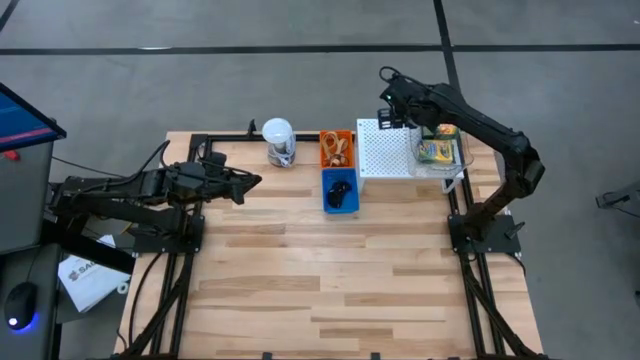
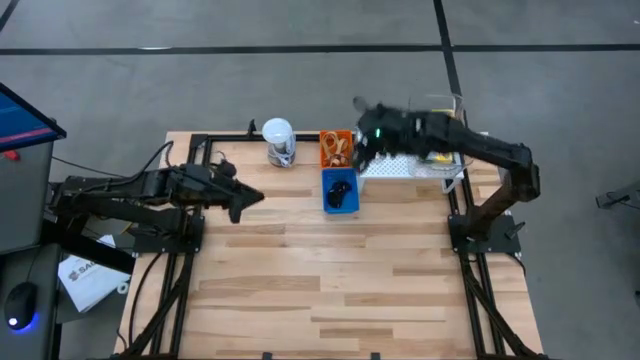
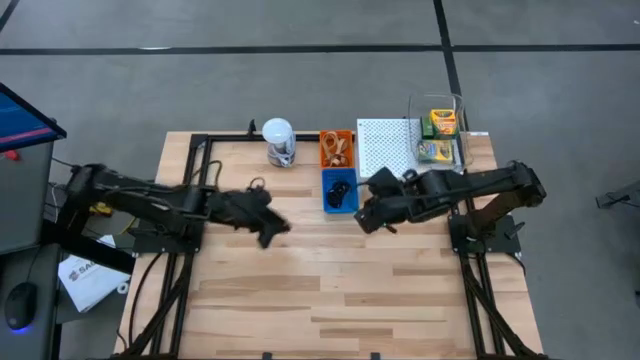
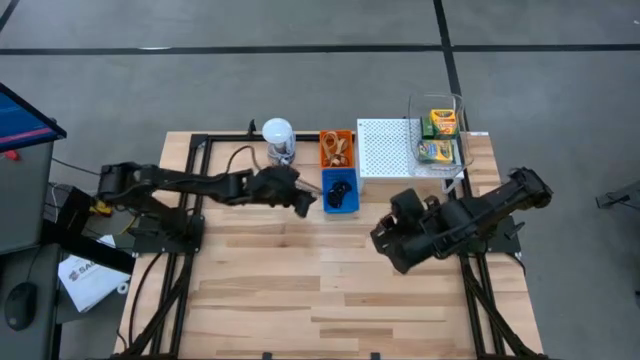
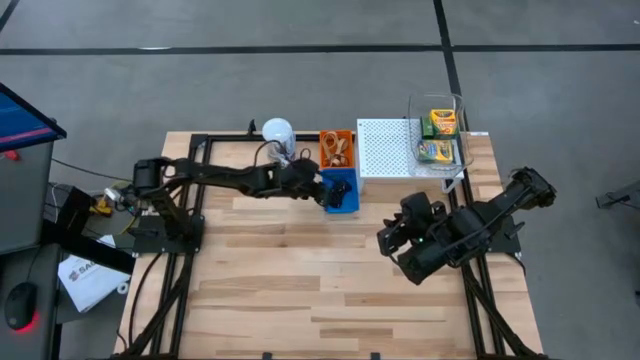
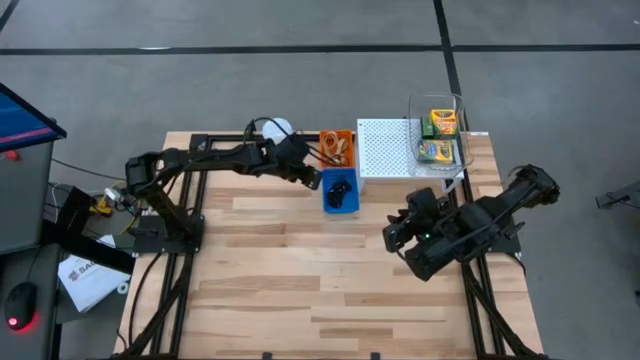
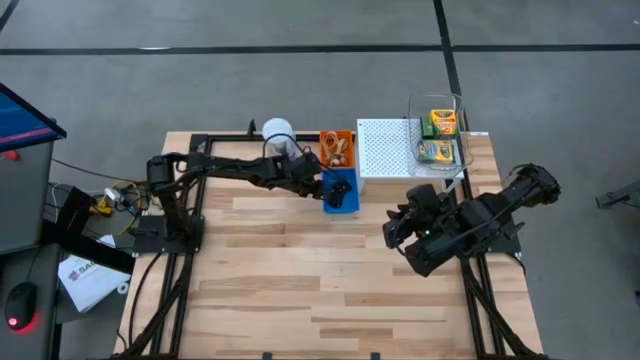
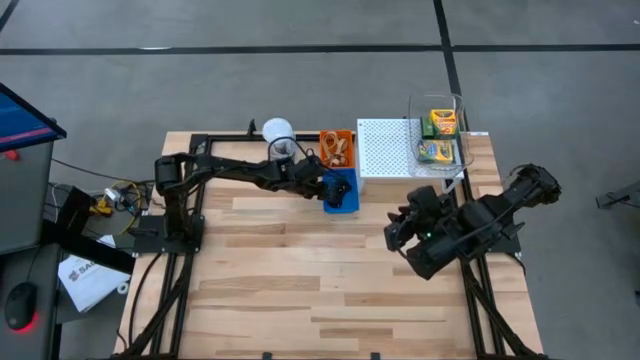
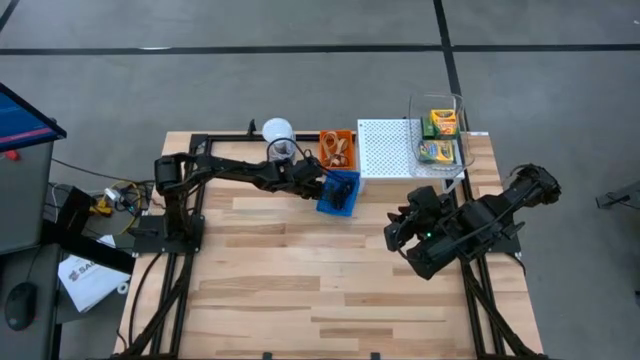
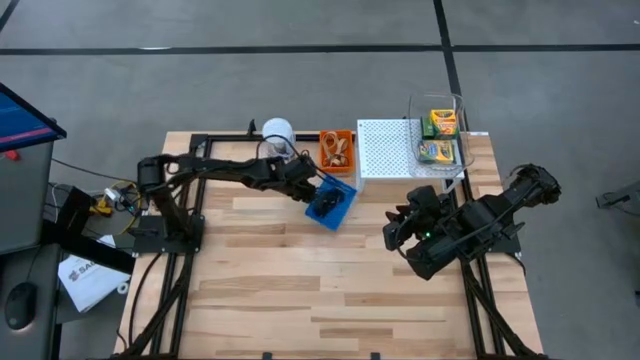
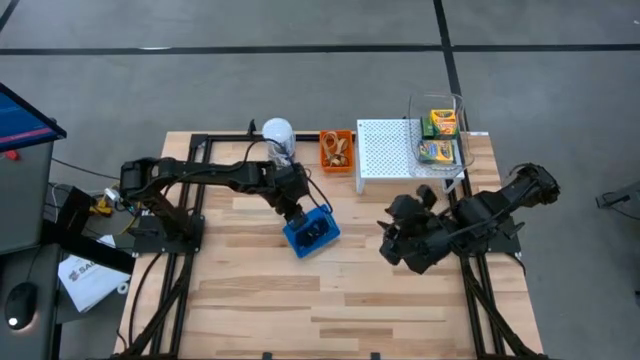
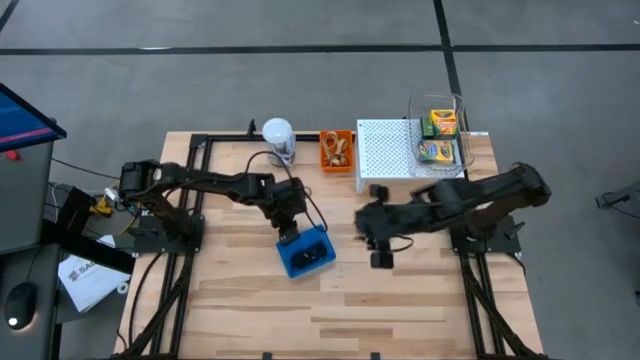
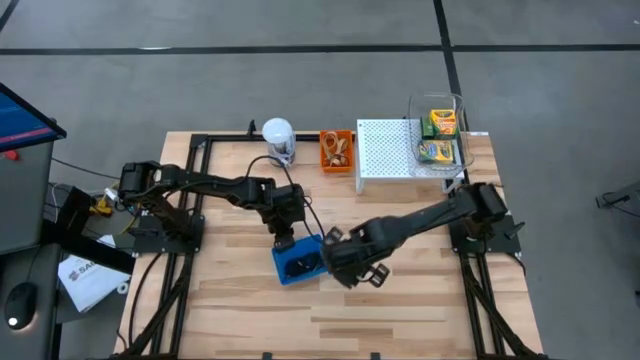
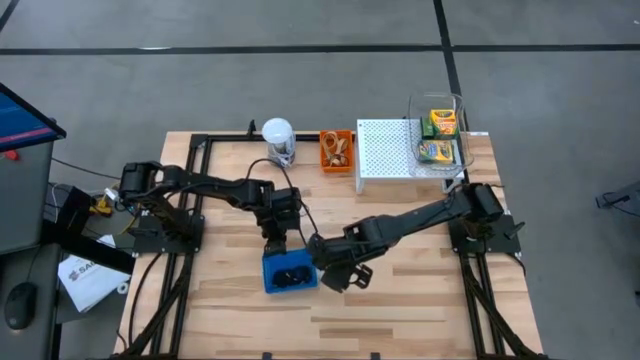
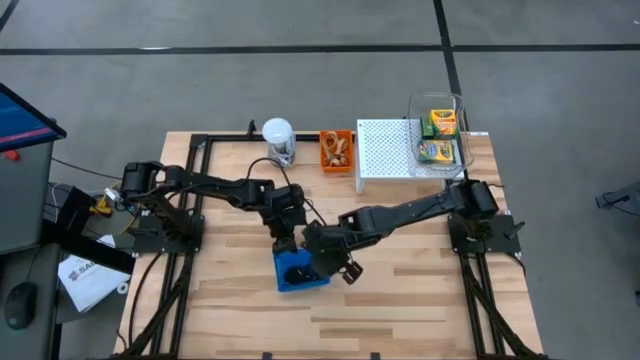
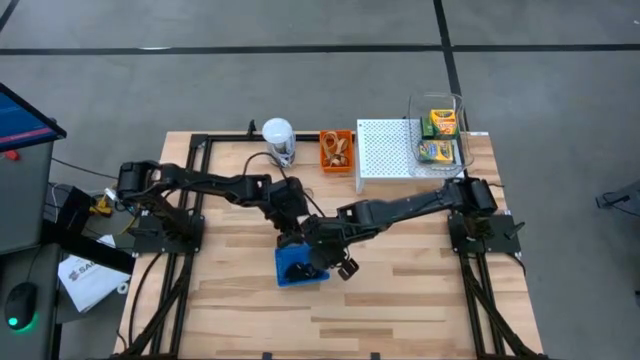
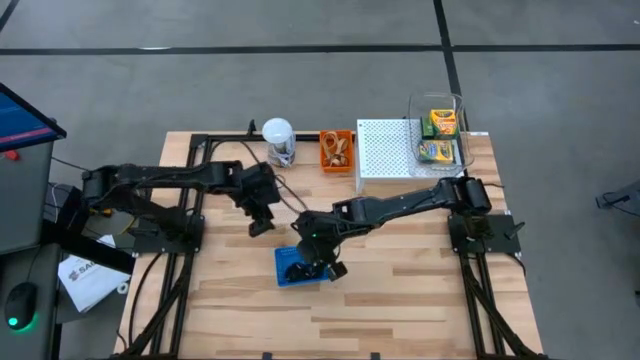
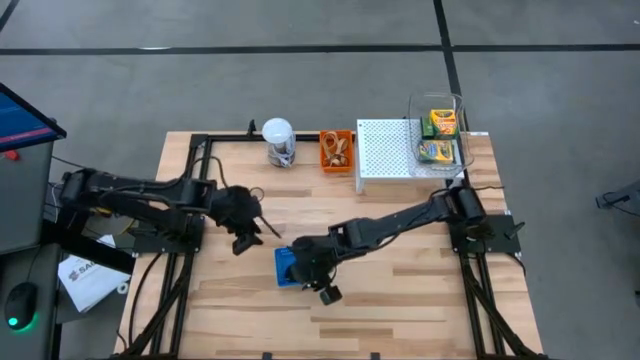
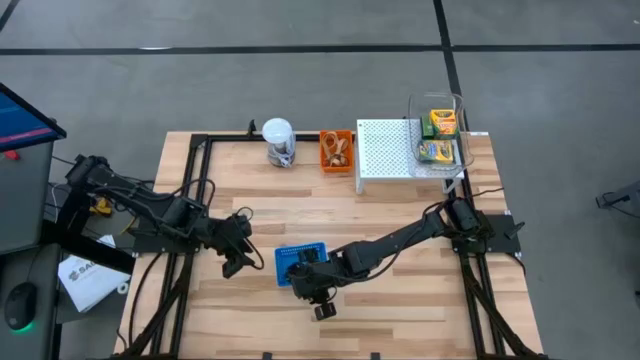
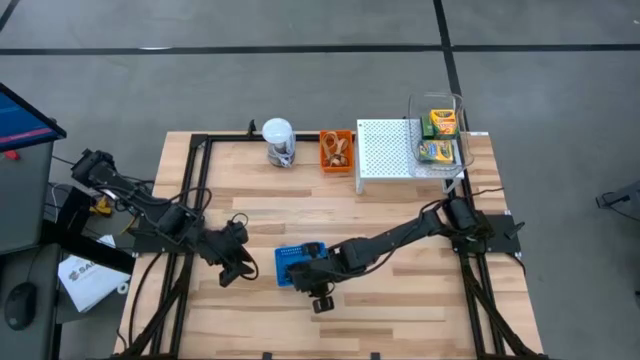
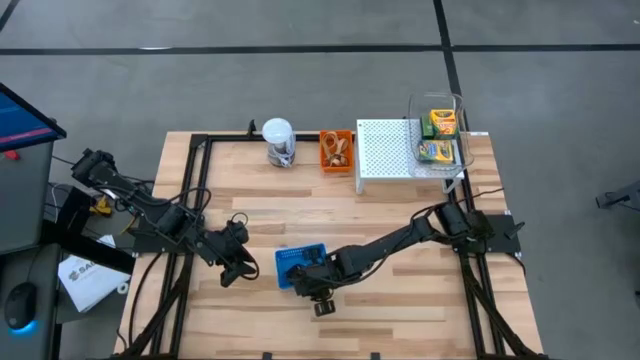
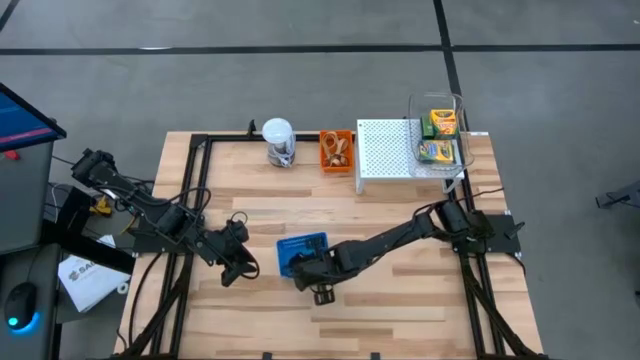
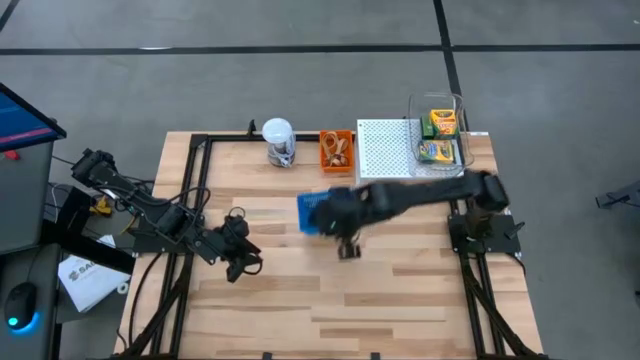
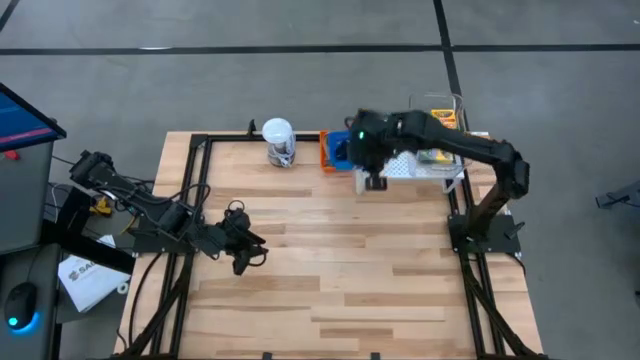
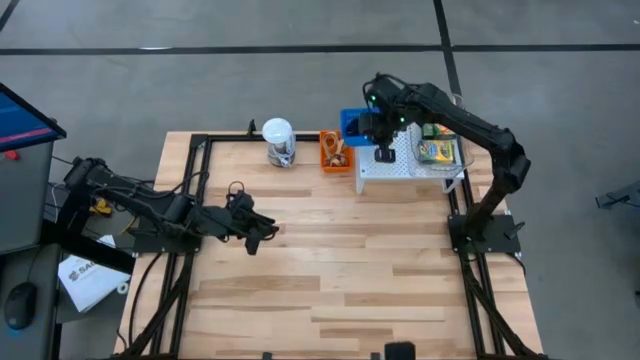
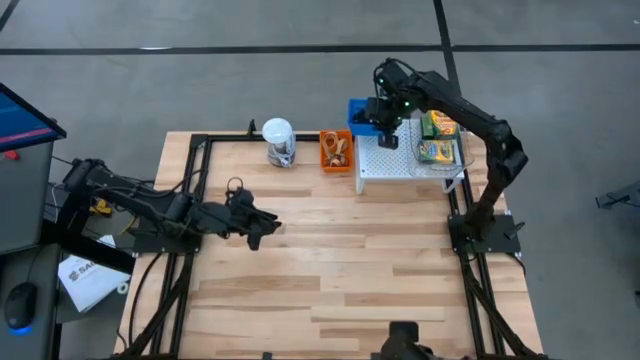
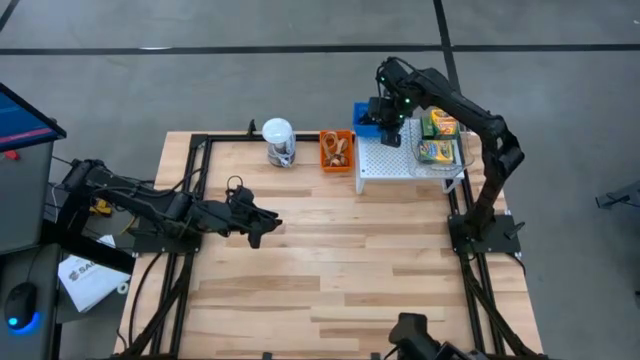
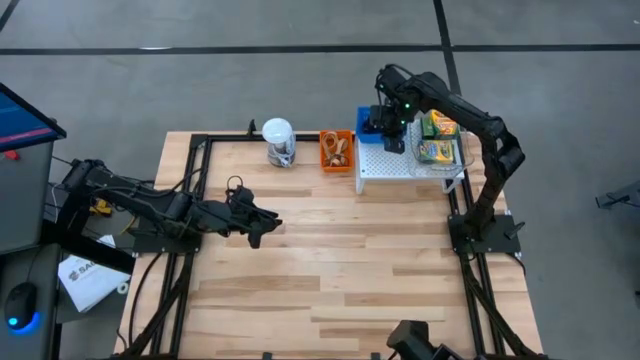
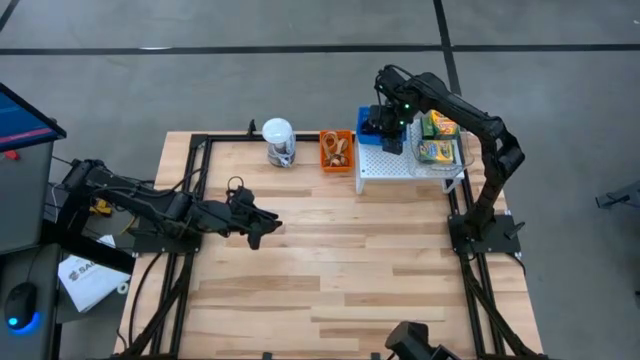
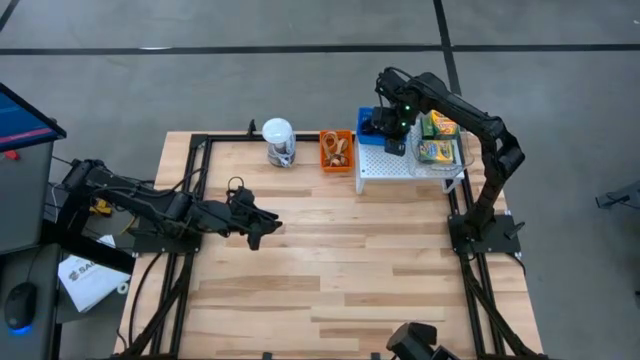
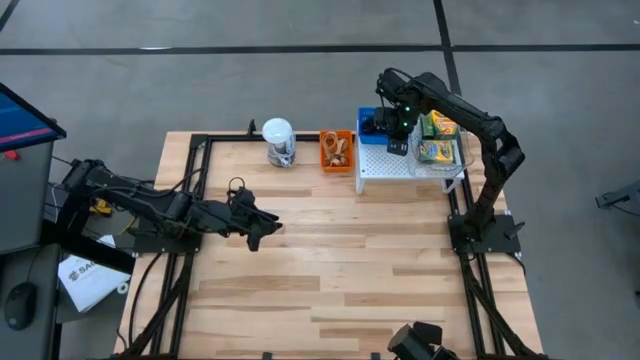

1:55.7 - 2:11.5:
Task: Pick & Place Office Desk Supplies
Put the blue basket on the shelf

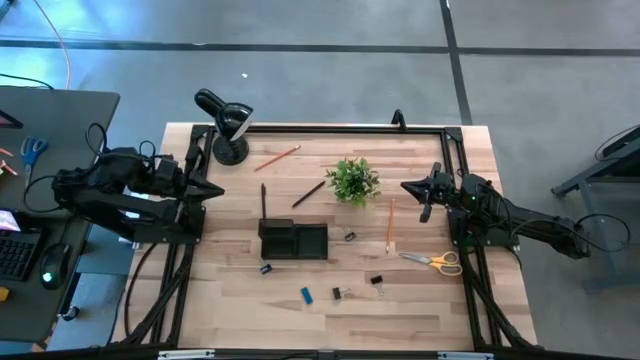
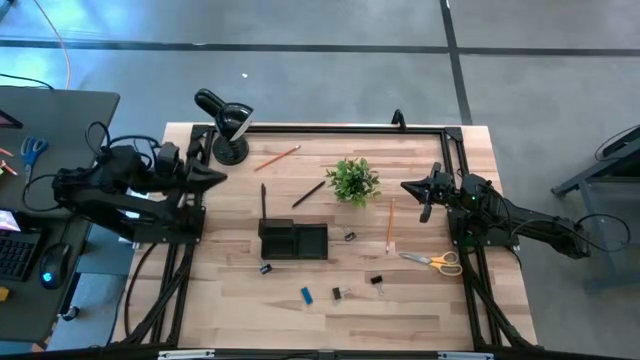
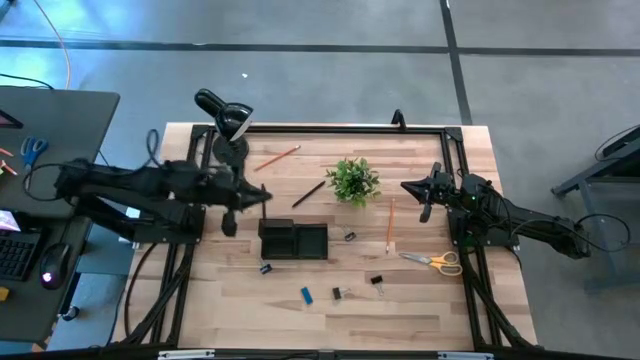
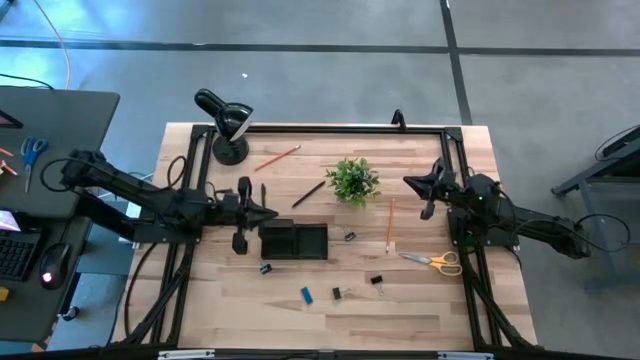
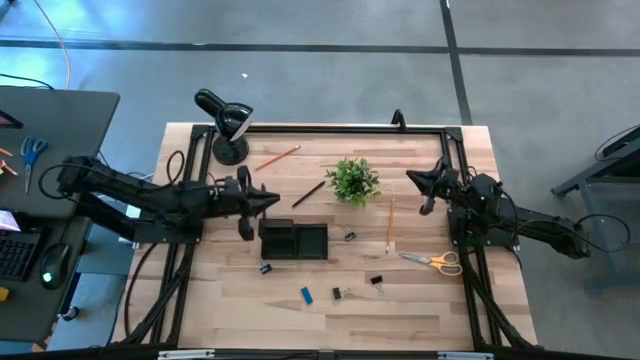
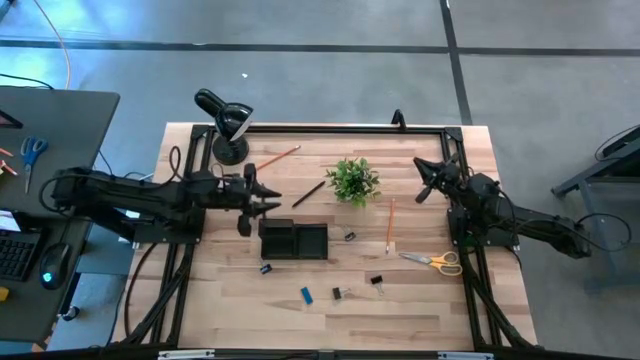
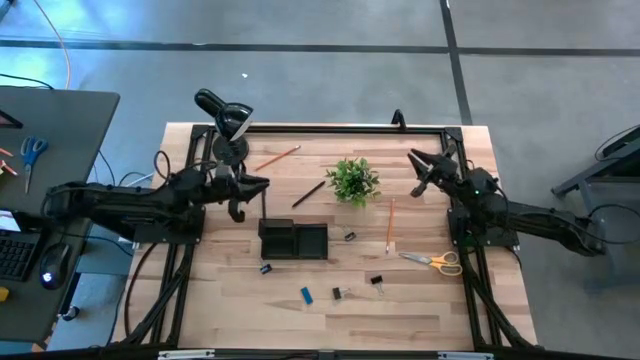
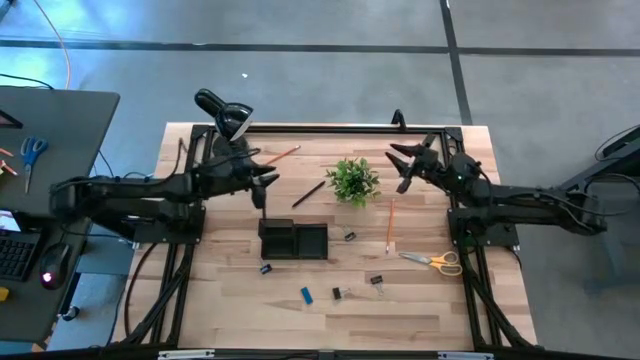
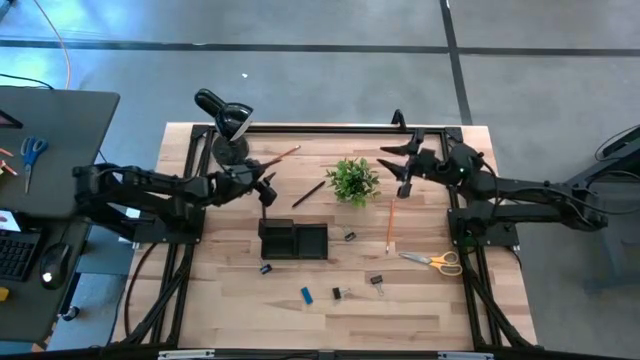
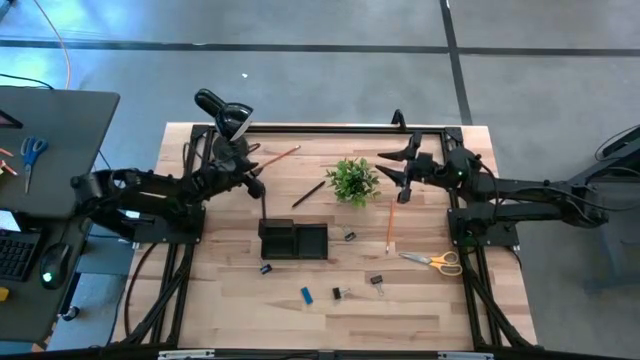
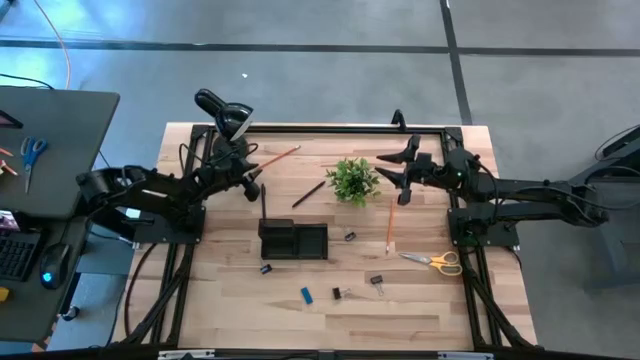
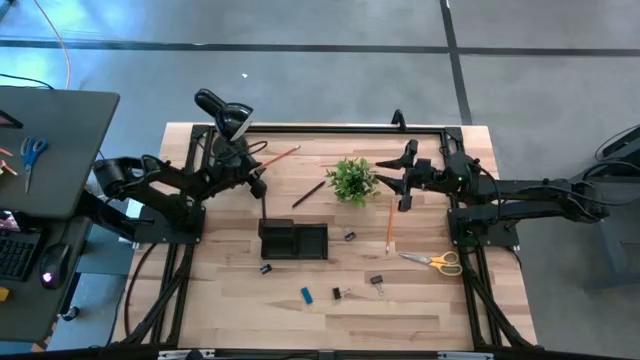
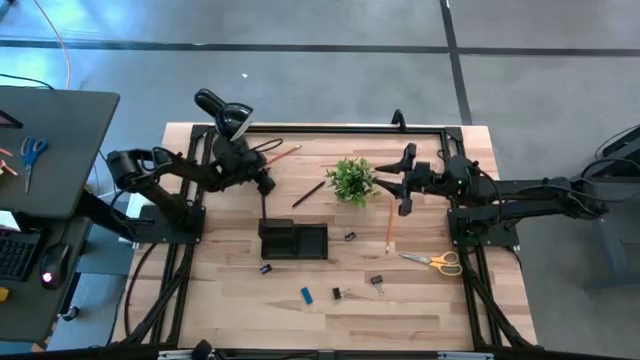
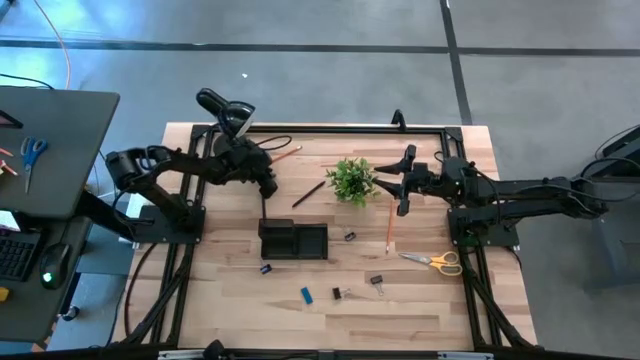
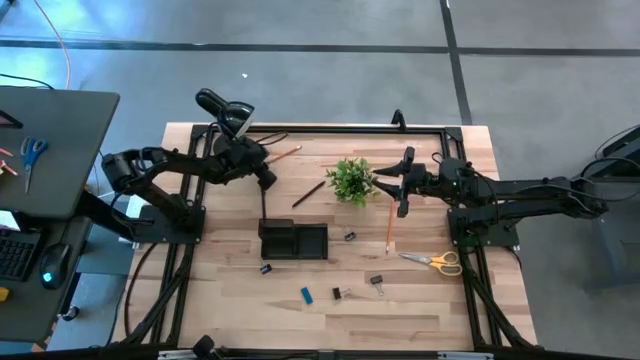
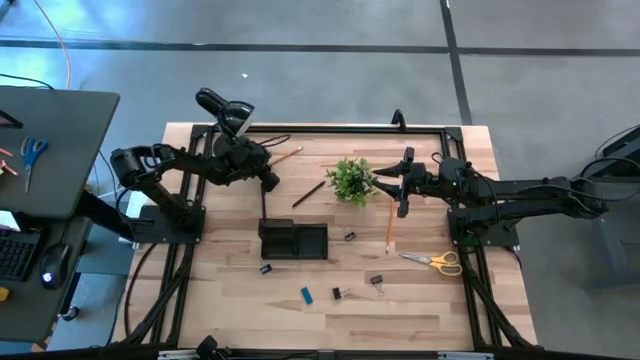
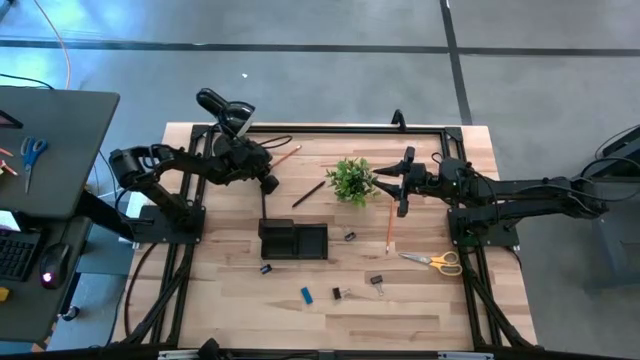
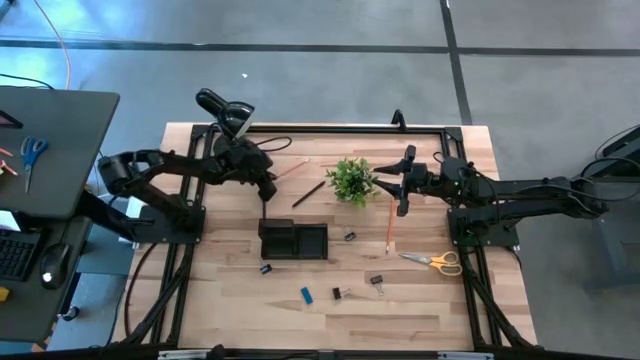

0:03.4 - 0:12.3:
Task: Pick and place office supplies into organizer
Put the orange pencil into the black desk organizer
